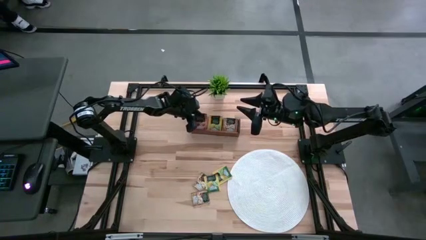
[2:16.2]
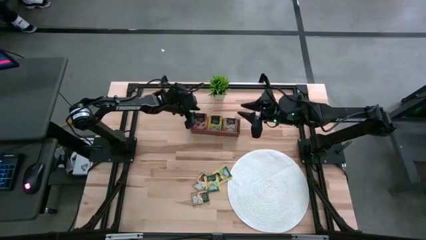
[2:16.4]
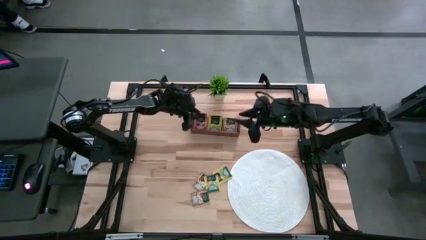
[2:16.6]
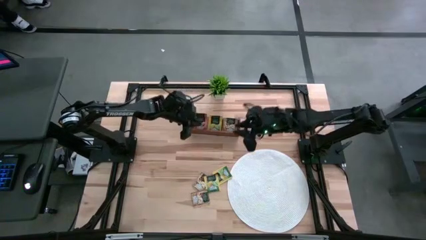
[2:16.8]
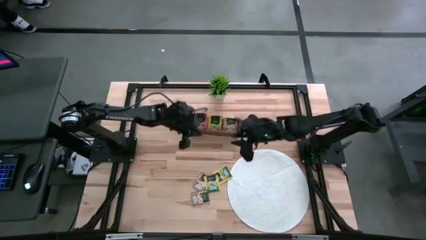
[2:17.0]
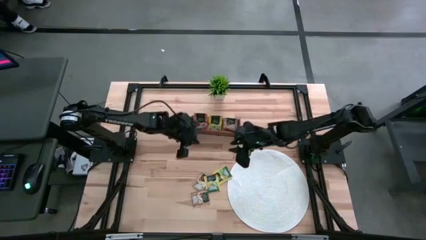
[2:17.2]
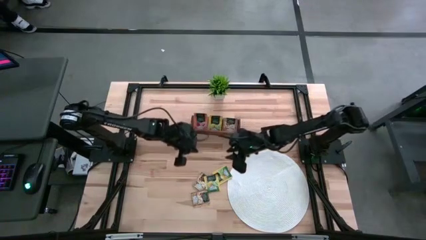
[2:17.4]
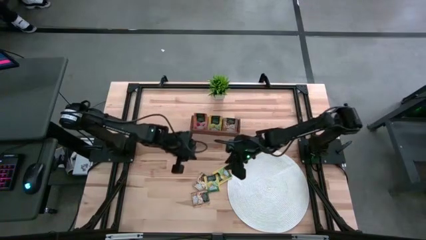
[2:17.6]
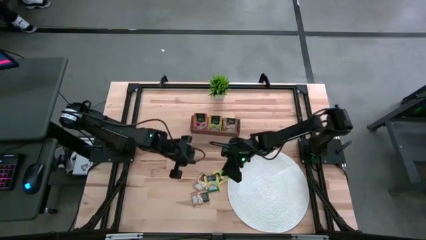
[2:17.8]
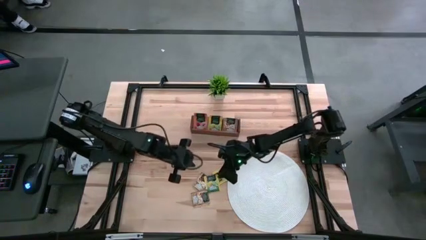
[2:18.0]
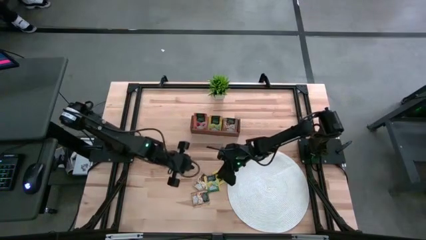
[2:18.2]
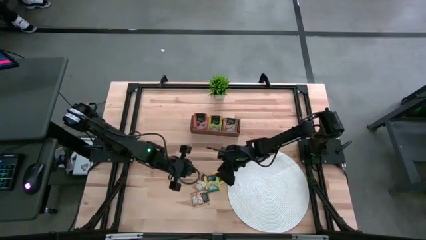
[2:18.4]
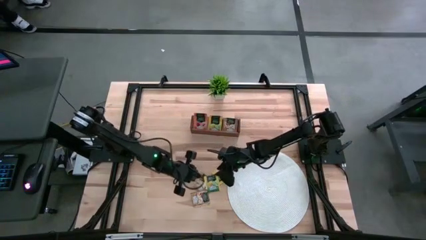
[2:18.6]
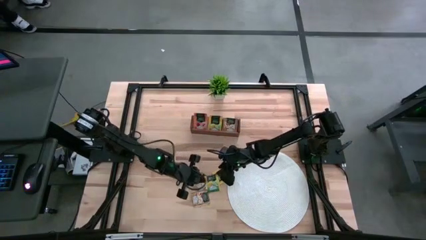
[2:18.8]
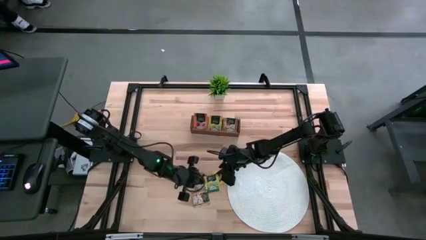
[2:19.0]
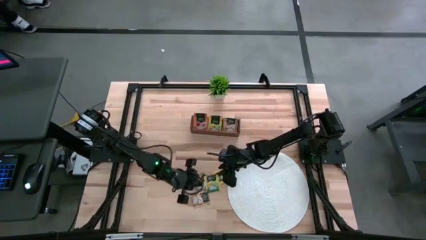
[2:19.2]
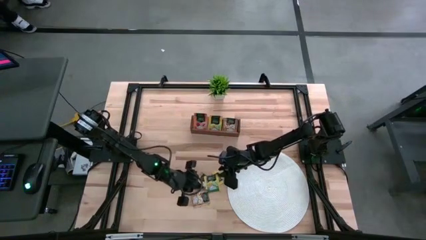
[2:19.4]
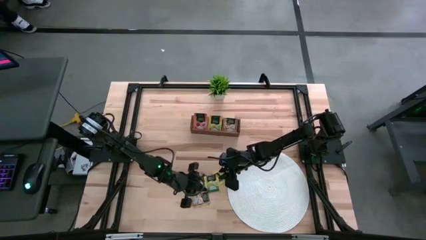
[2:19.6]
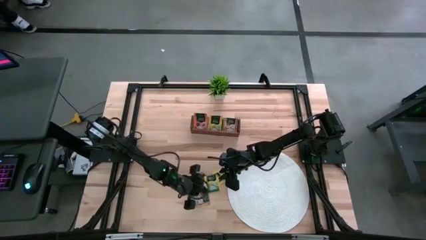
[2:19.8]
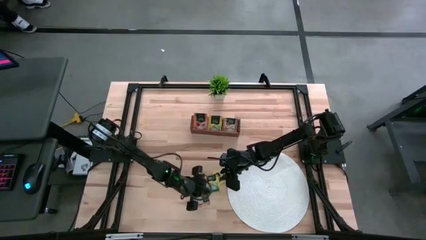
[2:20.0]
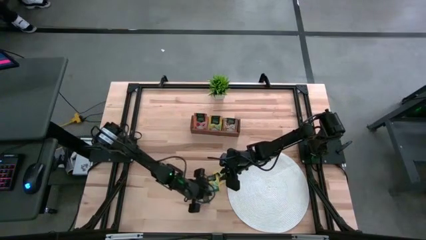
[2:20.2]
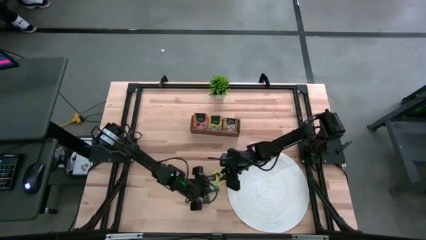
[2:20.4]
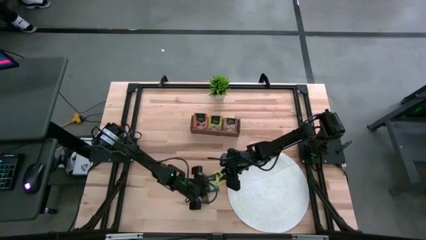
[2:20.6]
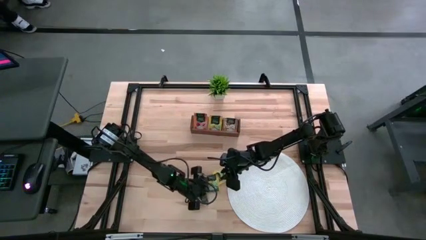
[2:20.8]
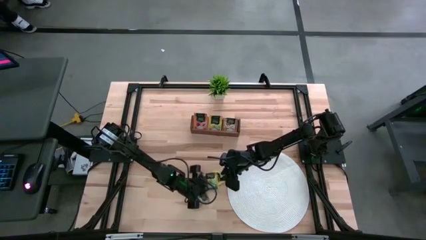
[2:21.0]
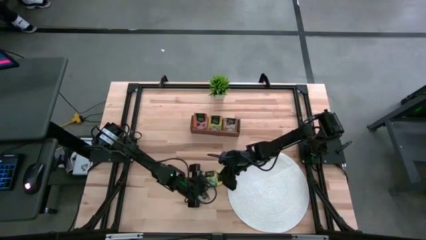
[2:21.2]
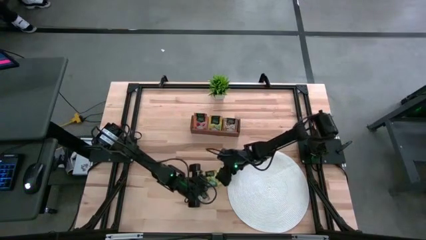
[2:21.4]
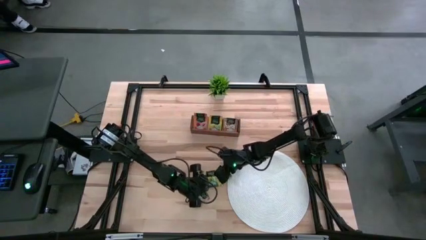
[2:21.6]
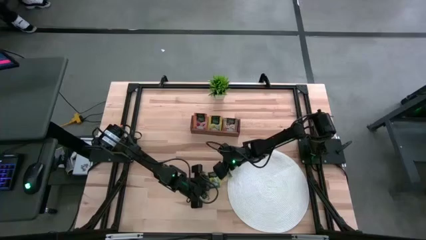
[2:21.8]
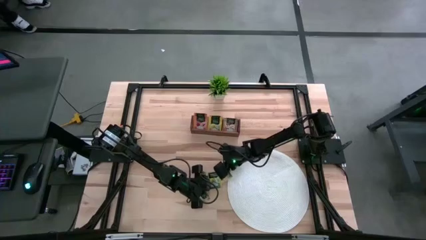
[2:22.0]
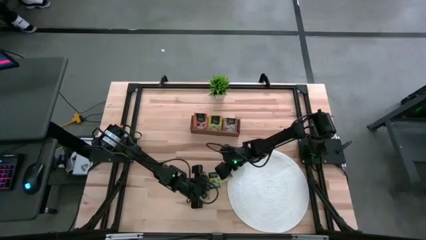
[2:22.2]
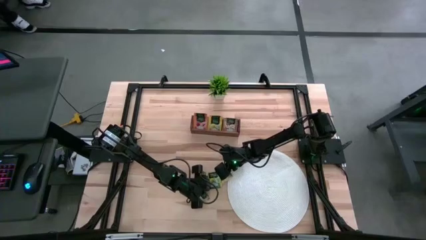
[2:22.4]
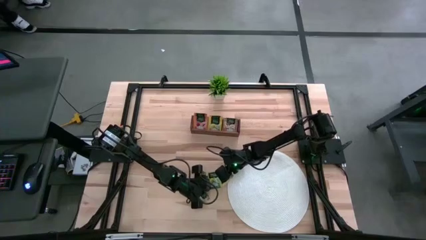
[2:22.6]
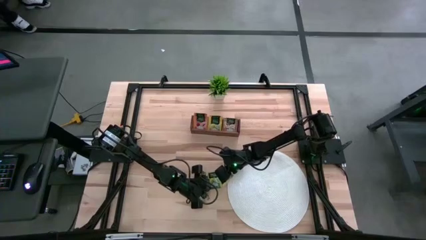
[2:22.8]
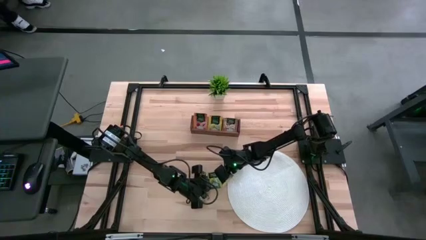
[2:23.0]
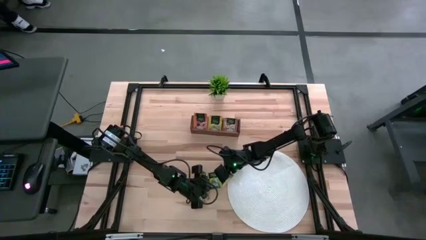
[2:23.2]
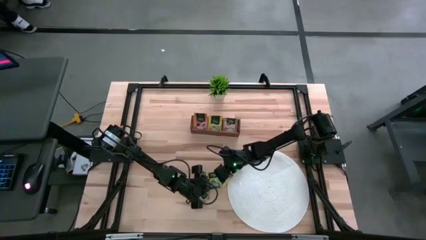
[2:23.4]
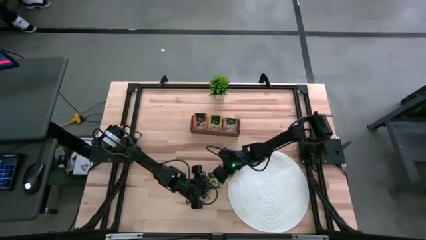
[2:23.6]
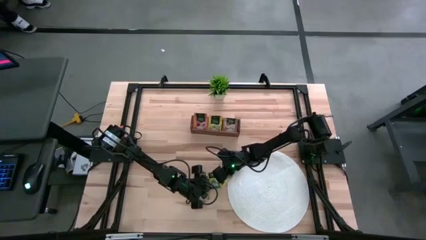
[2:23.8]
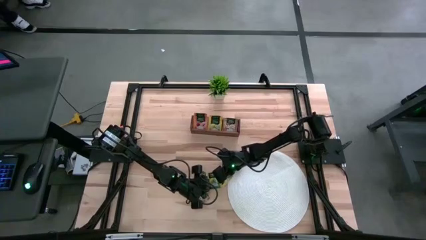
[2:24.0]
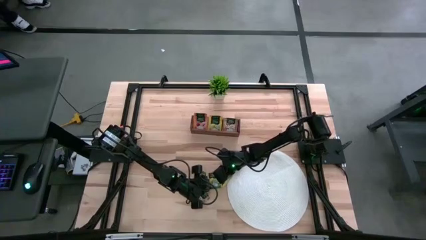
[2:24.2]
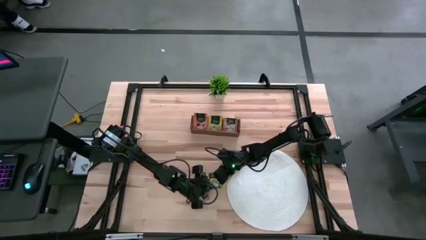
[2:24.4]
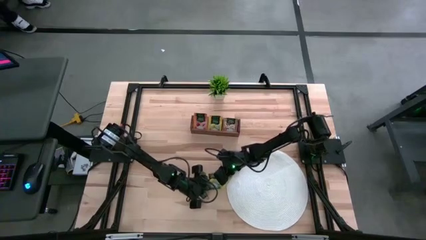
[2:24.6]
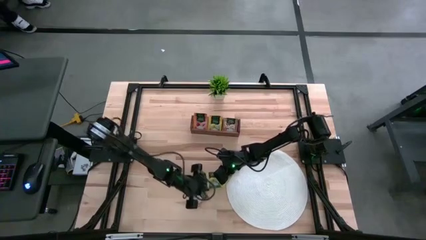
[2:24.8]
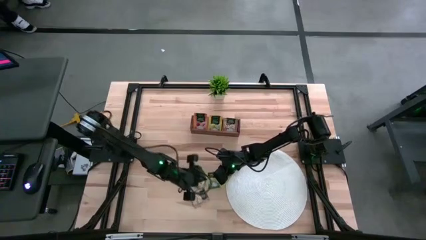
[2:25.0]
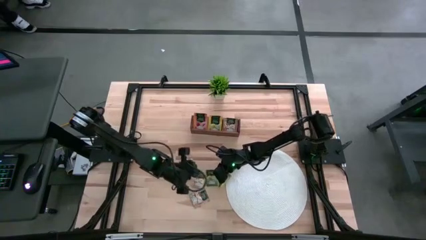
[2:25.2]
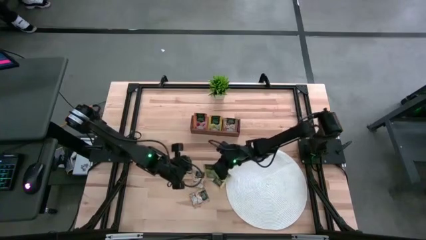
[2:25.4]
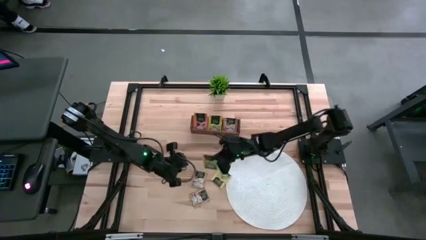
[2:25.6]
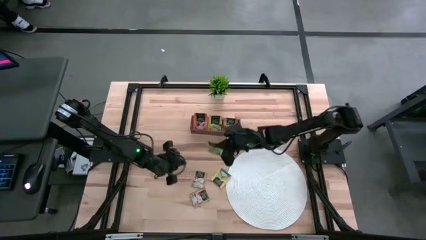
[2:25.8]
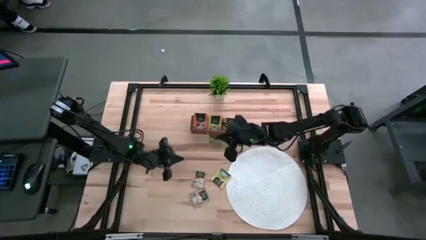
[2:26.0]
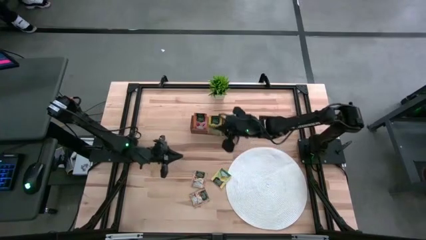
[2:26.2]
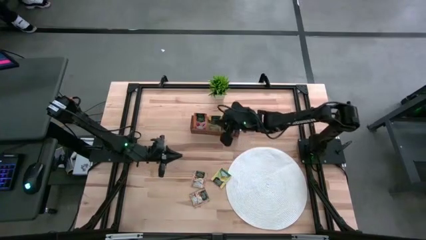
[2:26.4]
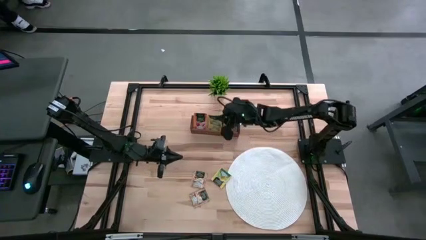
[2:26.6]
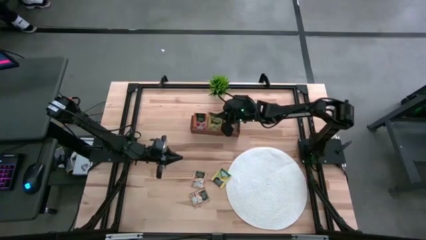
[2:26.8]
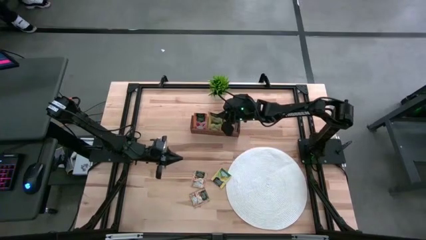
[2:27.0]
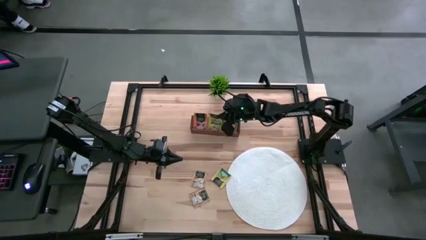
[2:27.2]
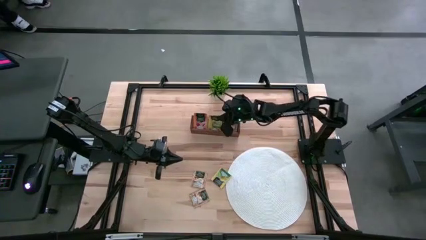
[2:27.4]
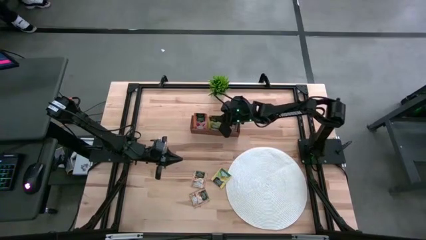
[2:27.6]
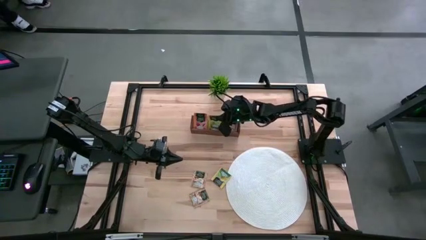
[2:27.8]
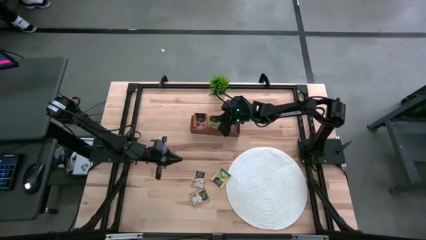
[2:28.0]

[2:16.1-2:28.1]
Task: Pick & Place Tea
Put the yellow tea bag into the middle section of the wooden organizer
